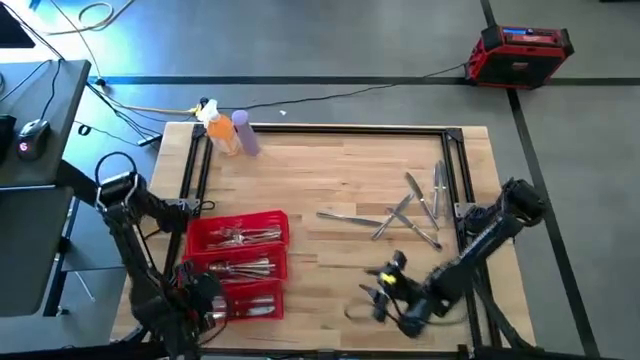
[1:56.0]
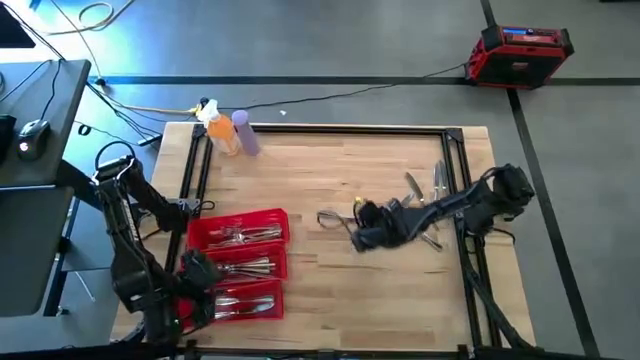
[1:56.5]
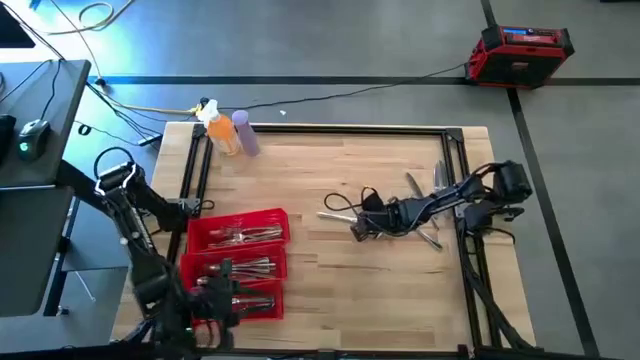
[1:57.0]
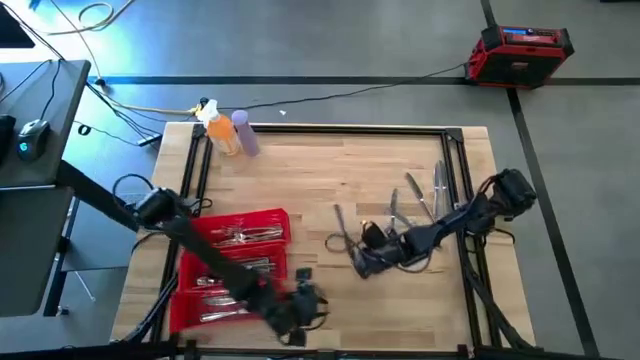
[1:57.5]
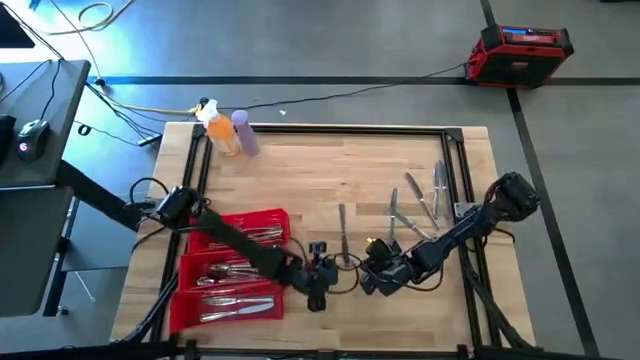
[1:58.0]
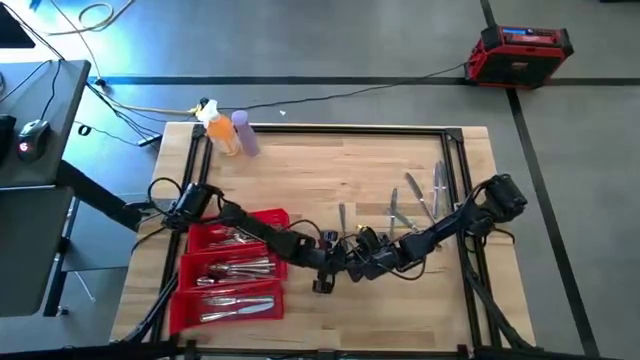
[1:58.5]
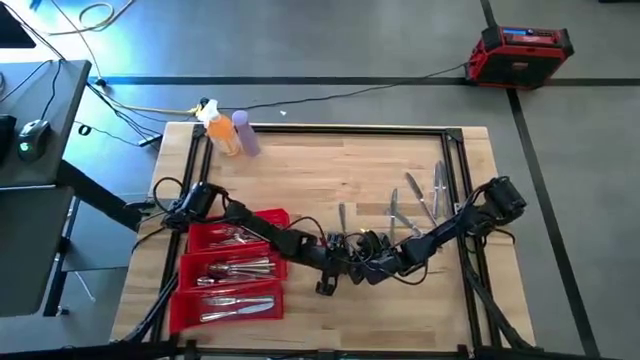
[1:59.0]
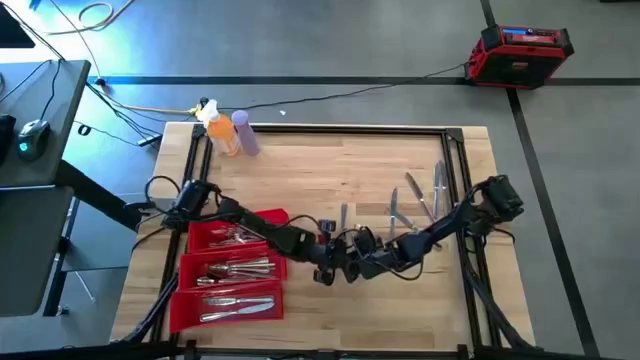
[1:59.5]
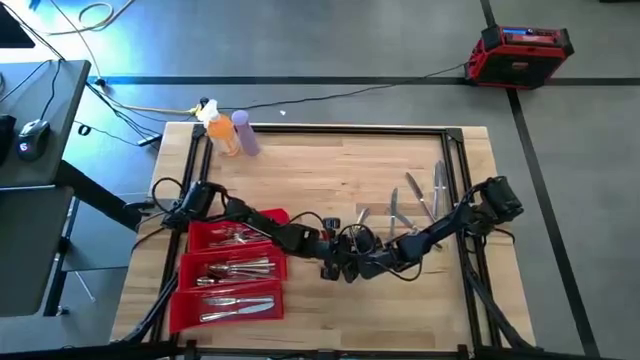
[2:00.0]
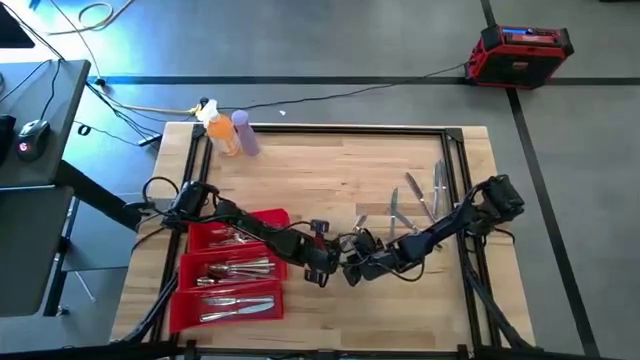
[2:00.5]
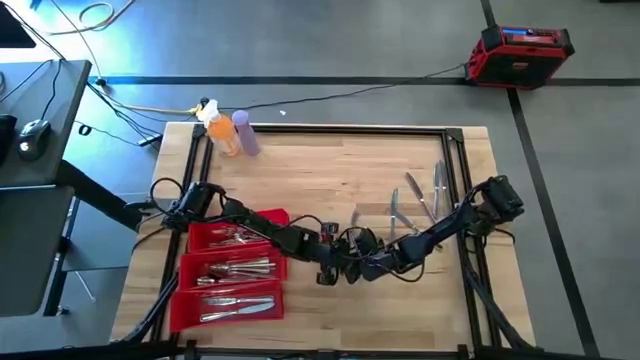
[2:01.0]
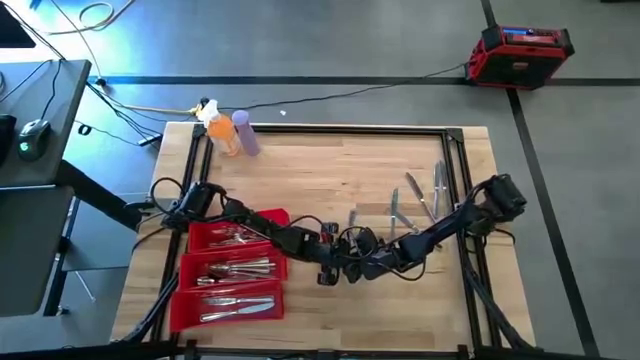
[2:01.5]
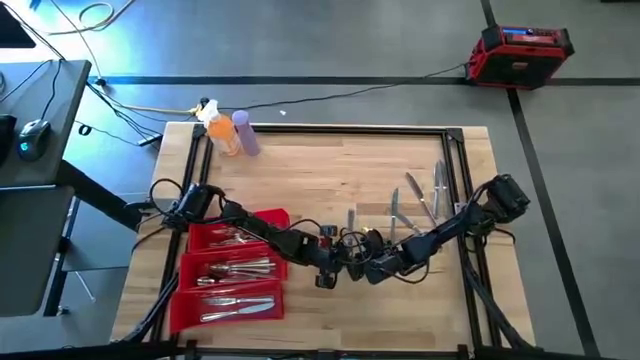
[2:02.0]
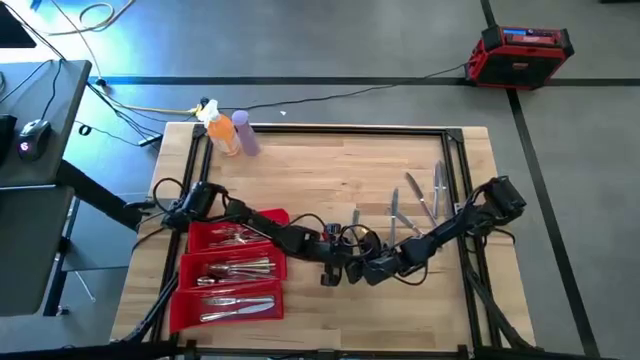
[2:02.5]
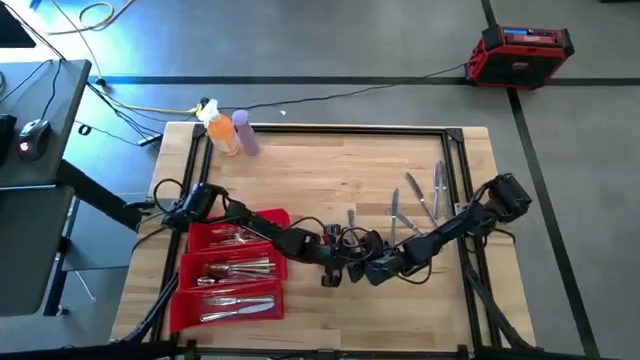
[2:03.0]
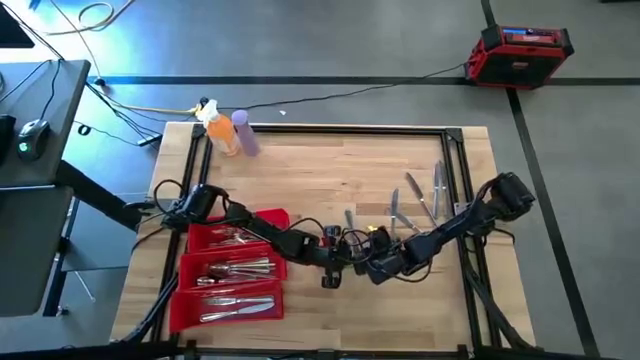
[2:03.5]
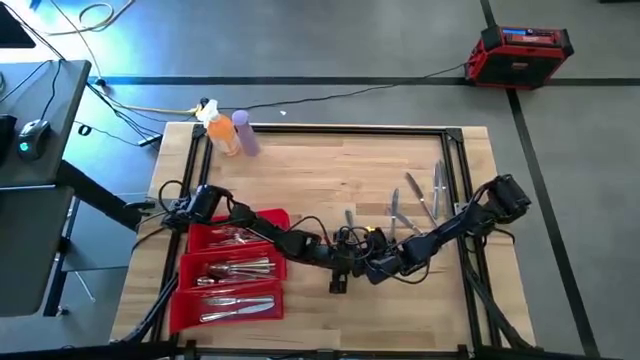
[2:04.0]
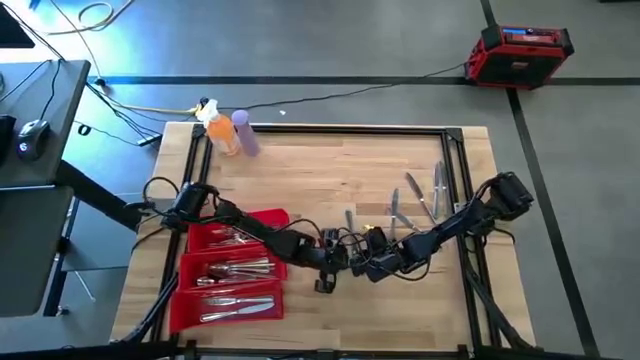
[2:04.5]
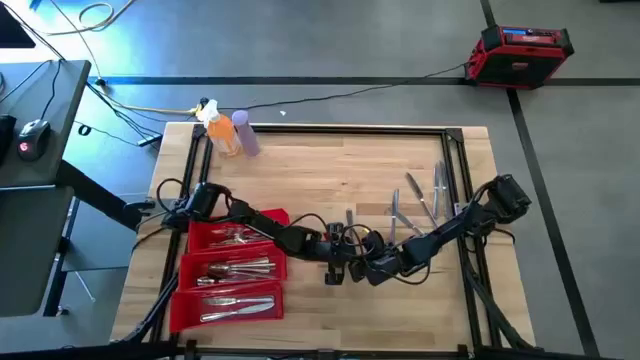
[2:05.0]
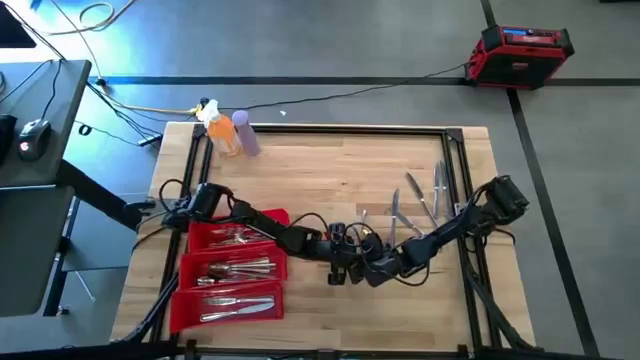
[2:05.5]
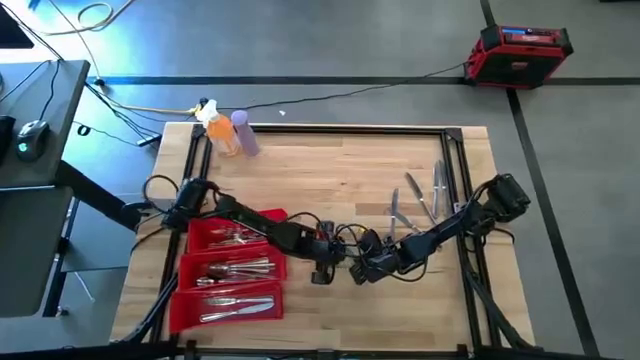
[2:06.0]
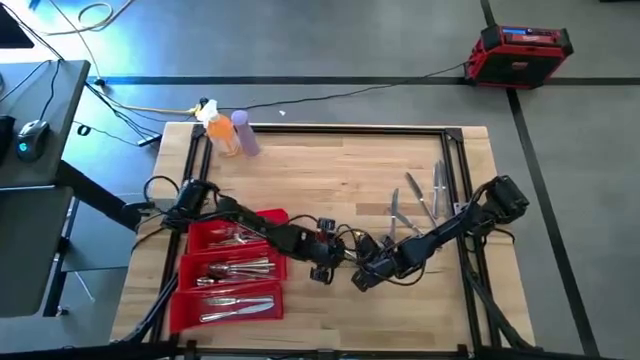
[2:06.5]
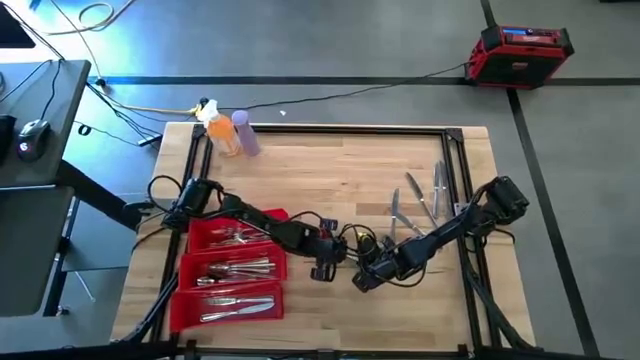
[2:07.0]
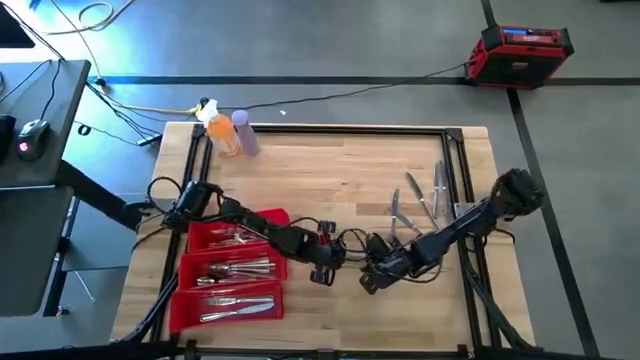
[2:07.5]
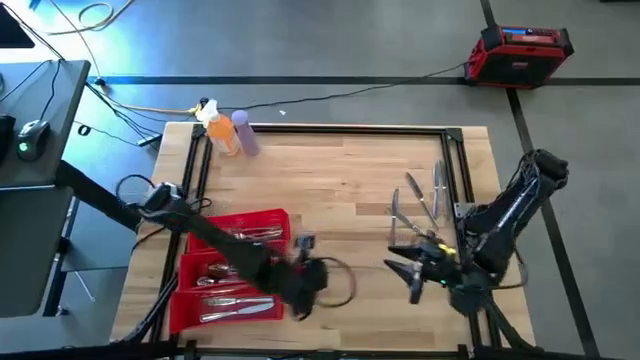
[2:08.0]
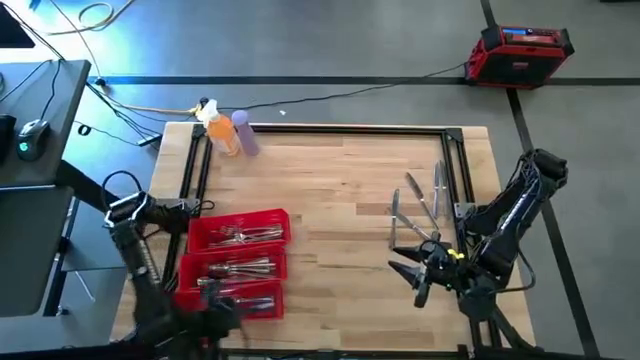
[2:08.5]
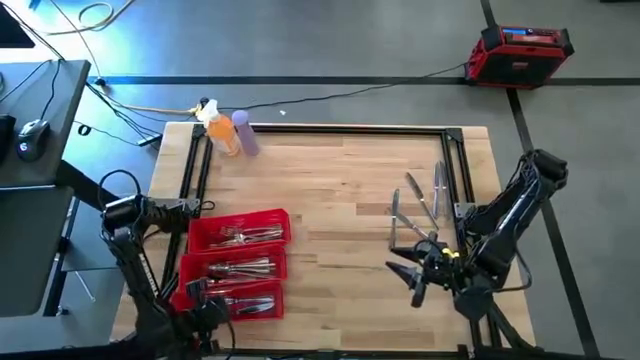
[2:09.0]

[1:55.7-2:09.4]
Task: Sort silverware
Put the silver knife in the bottom red bin

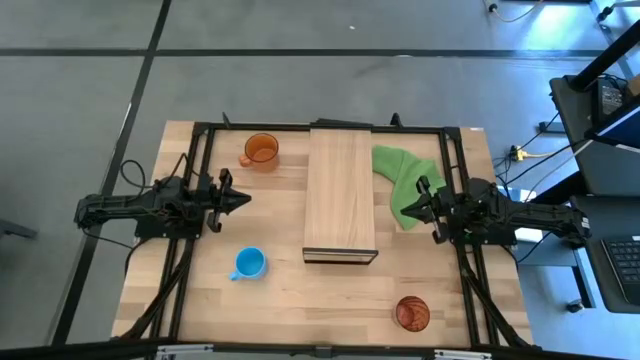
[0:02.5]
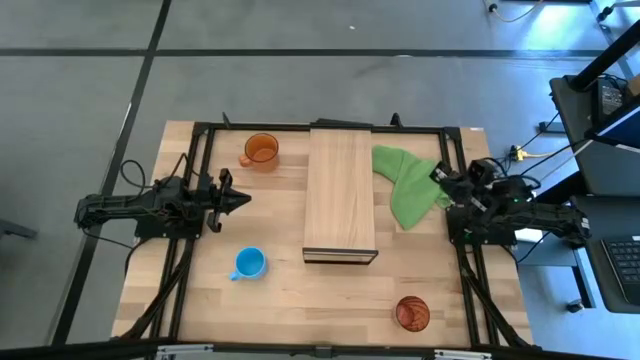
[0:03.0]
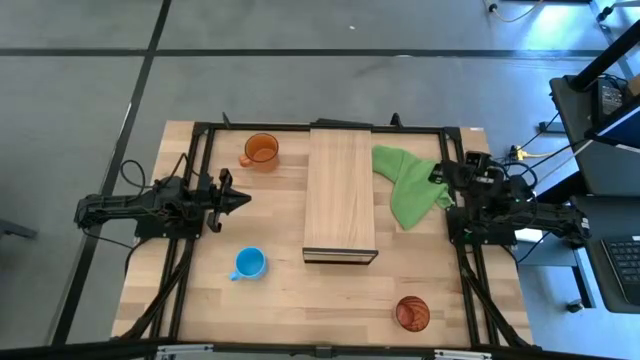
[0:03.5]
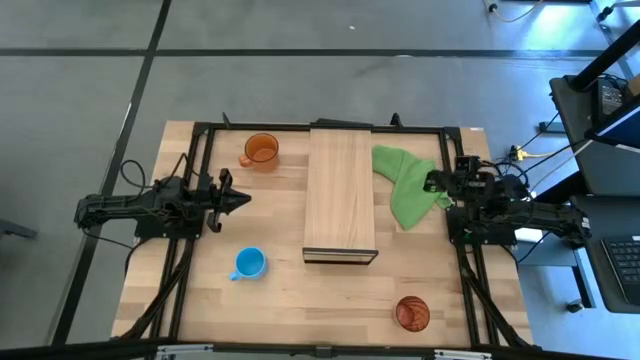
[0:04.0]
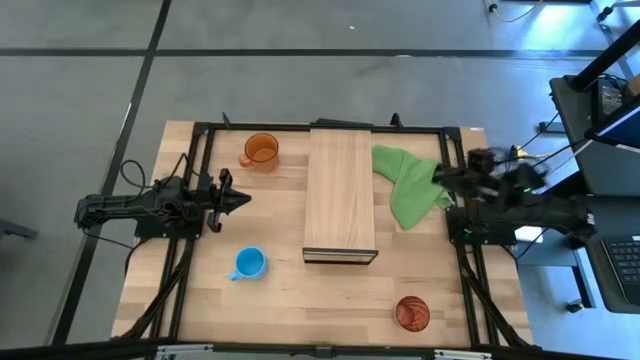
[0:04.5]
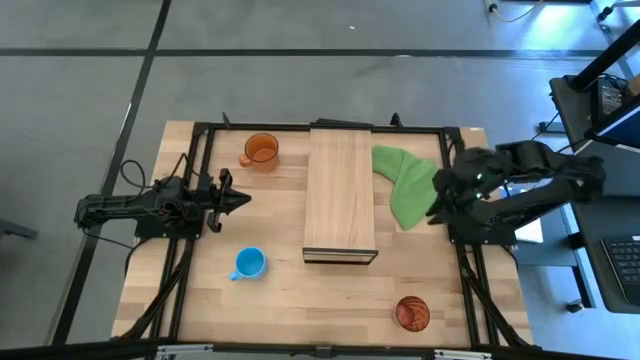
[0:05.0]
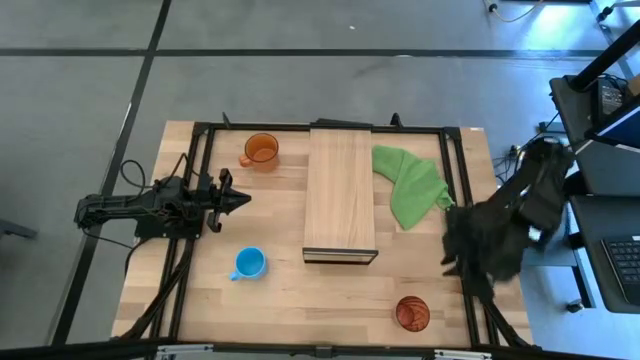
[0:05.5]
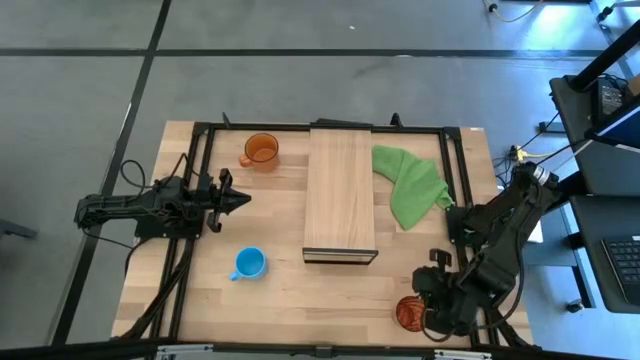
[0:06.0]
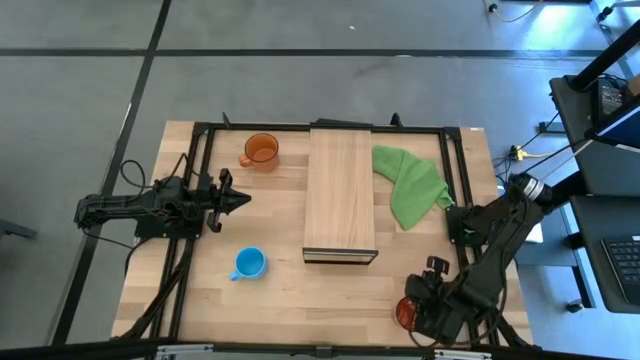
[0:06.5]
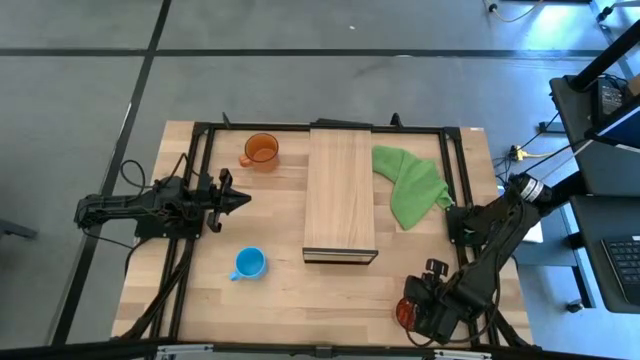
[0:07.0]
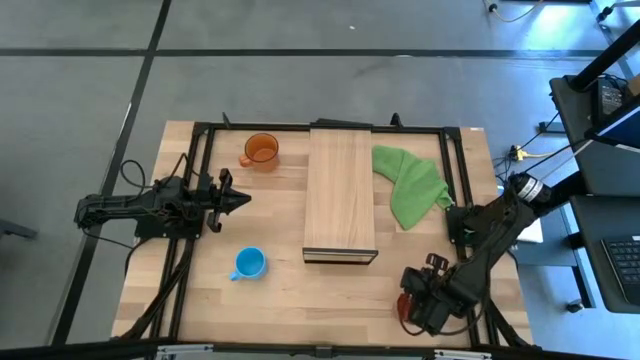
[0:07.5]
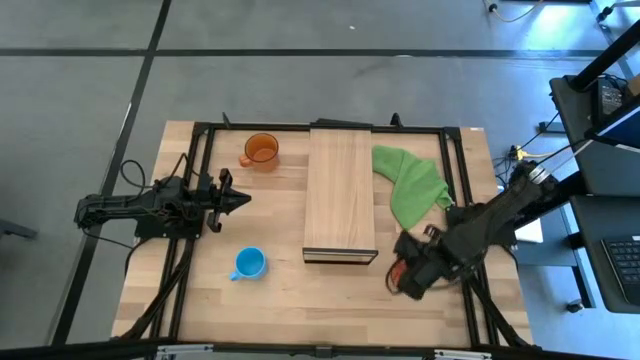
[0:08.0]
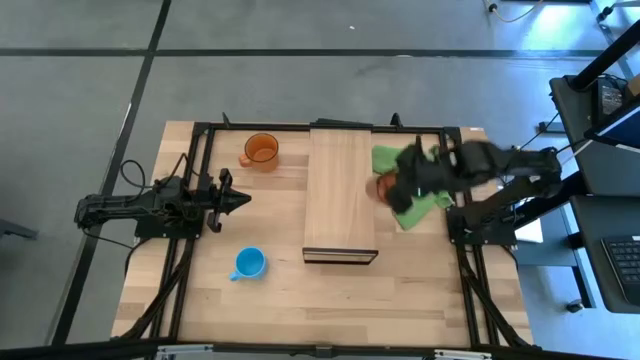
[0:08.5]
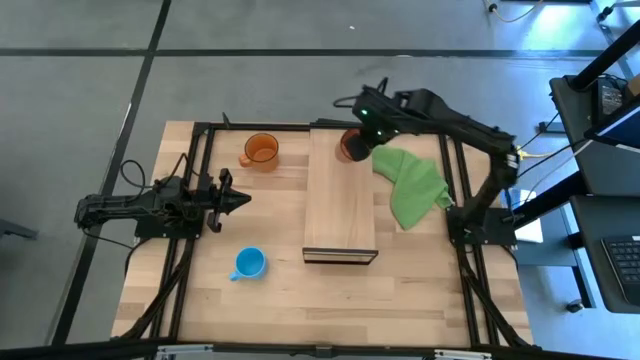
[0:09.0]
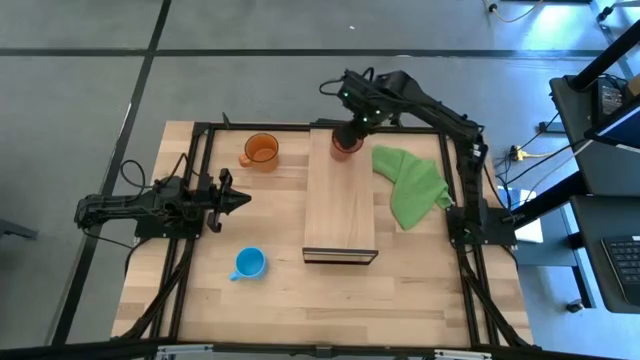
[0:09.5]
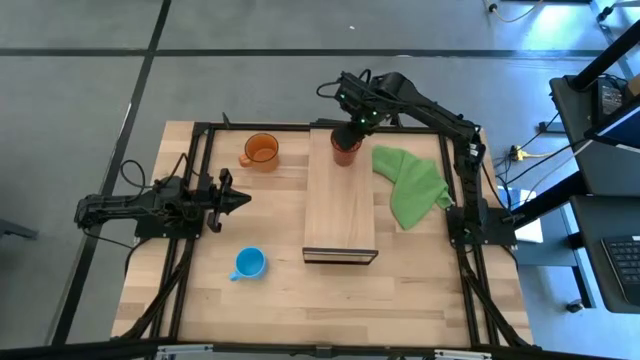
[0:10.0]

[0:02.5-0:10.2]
Task: Stack small to large cups/mugs on shelf
Put the orange cup on the shelf
